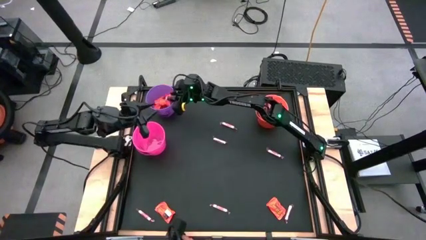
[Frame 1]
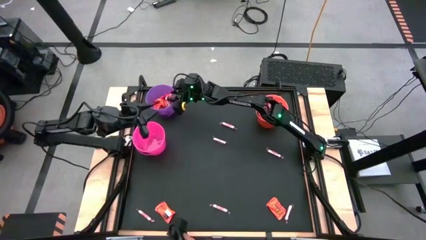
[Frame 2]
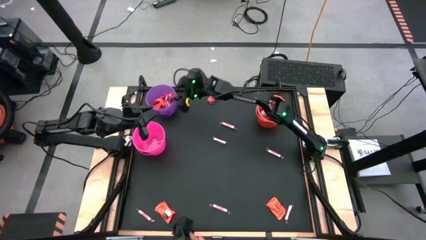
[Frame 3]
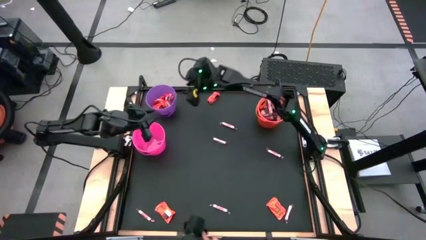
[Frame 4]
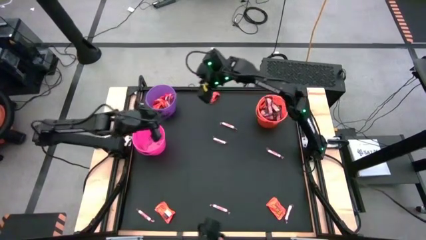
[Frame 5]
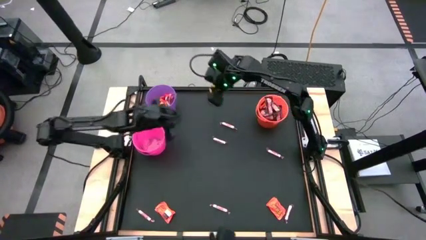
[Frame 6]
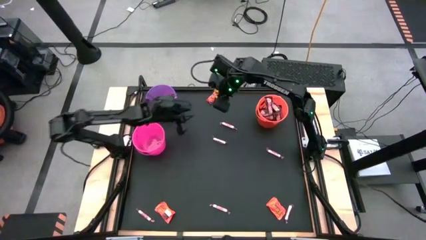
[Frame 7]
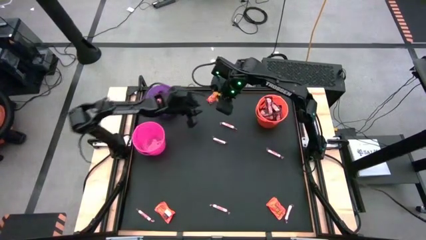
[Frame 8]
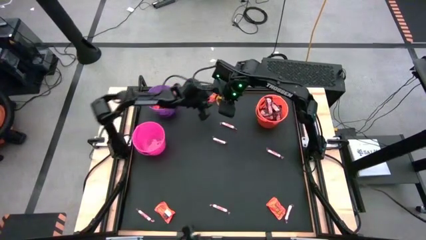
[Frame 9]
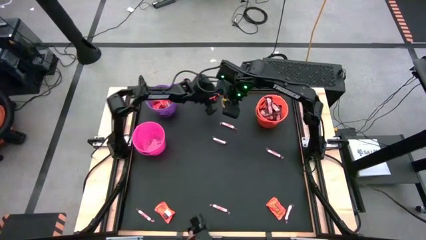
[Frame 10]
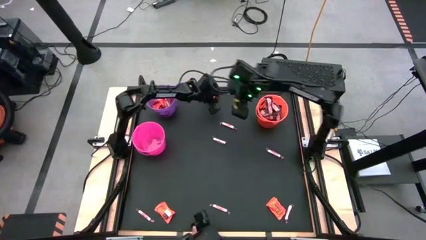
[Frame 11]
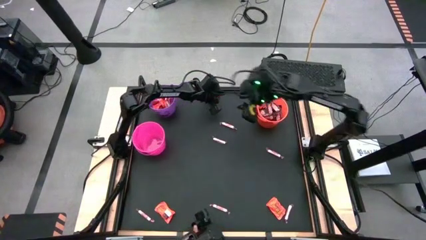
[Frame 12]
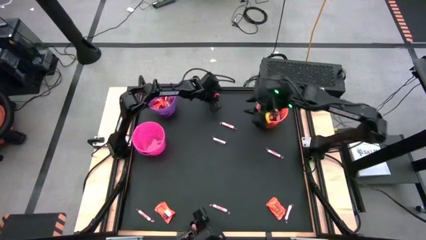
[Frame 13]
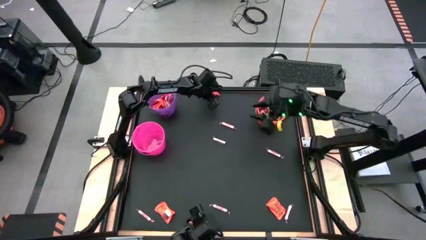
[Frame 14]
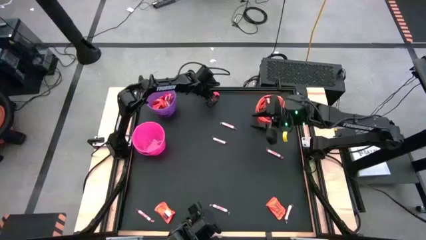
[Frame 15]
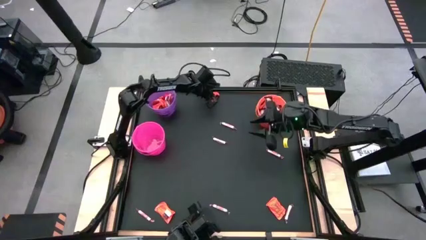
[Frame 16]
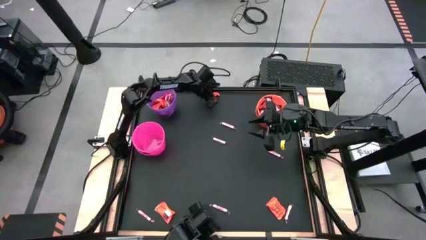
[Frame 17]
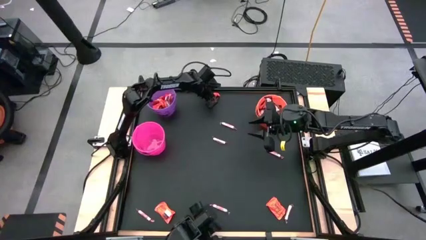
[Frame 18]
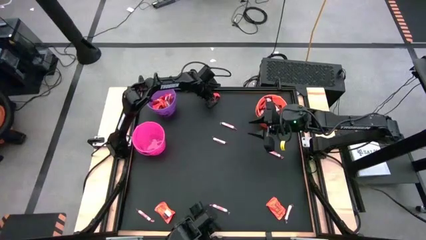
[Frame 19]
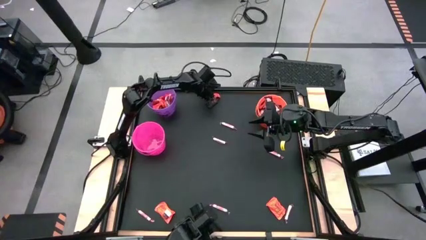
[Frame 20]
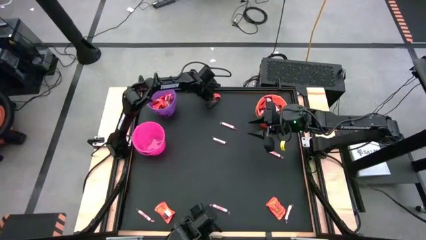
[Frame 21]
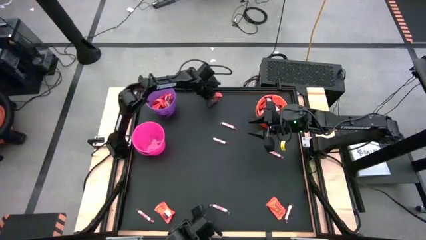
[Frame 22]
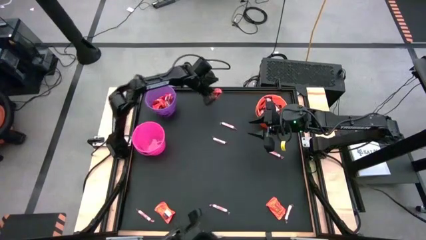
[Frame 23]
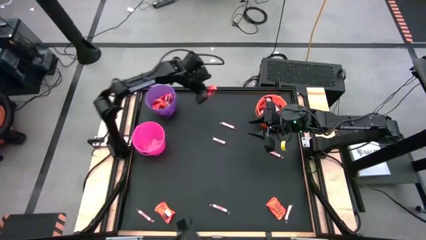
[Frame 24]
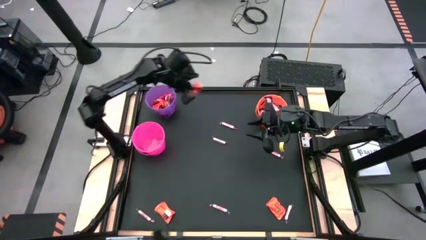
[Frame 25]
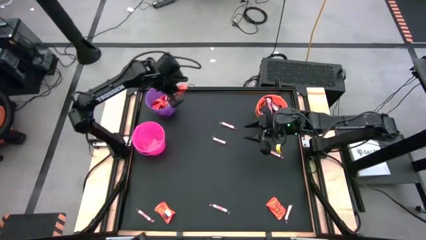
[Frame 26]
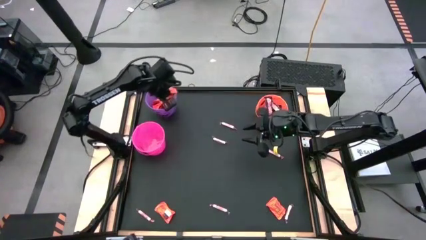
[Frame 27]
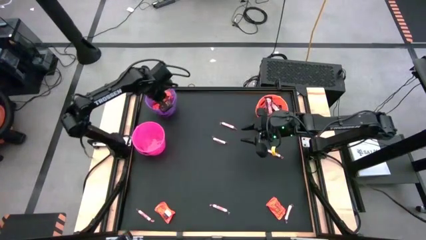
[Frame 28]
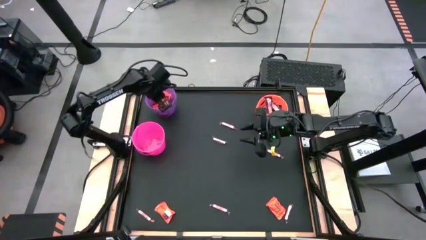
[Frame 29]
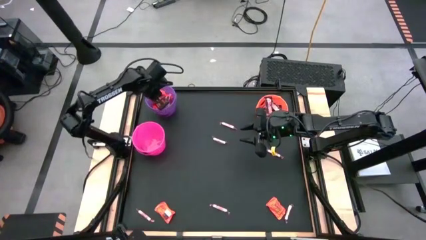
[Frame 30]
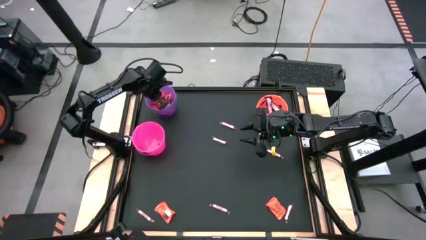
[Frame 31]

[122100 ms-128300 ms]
Task: Sort candy by brand, put in halloween buckets
Put the orange candy into the purple bucket

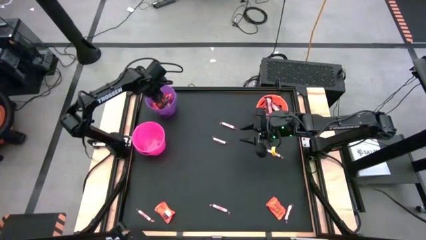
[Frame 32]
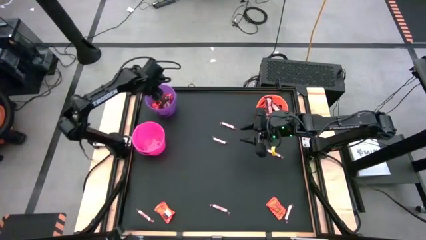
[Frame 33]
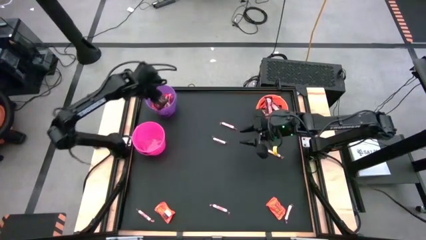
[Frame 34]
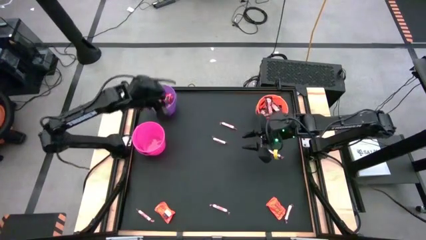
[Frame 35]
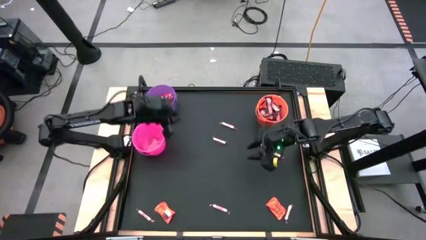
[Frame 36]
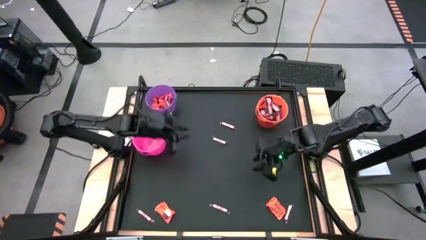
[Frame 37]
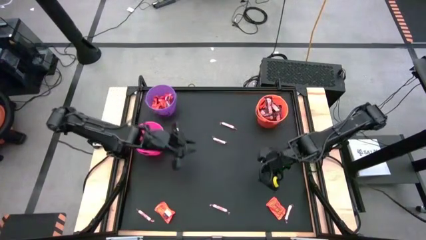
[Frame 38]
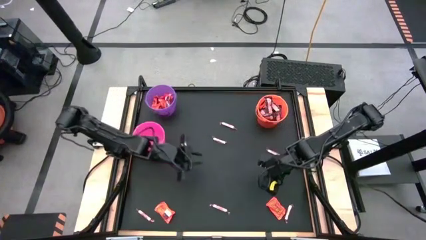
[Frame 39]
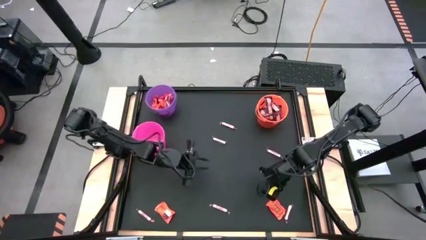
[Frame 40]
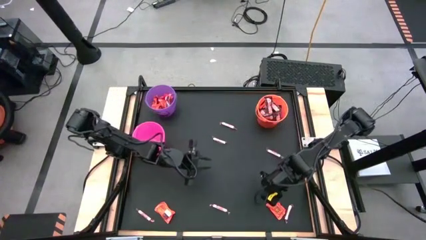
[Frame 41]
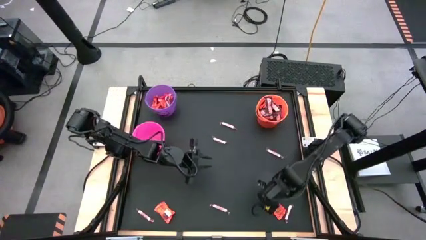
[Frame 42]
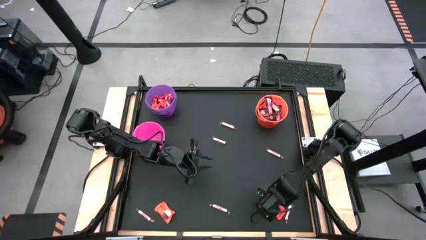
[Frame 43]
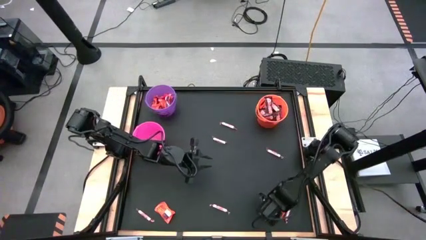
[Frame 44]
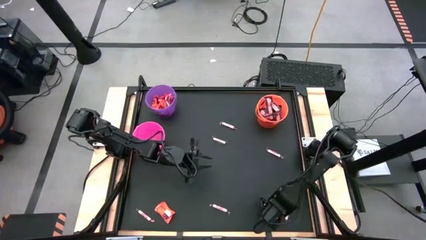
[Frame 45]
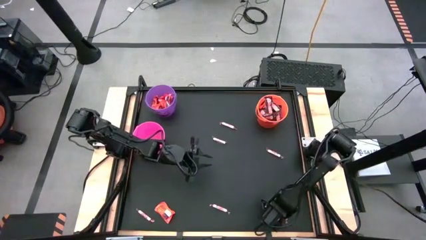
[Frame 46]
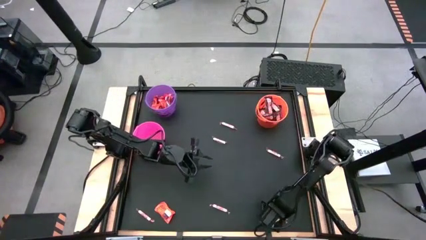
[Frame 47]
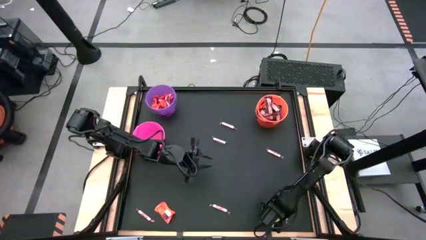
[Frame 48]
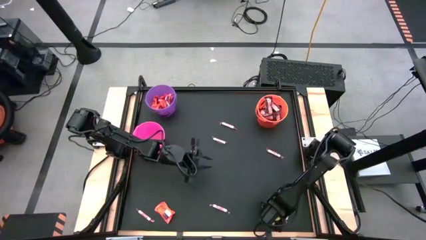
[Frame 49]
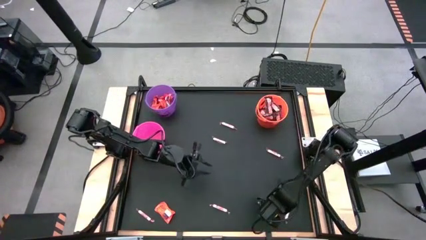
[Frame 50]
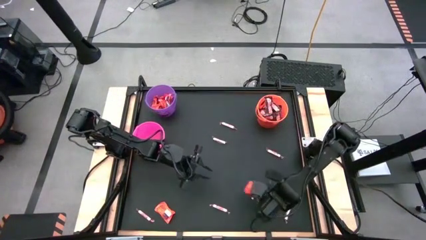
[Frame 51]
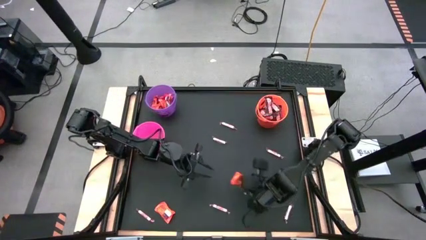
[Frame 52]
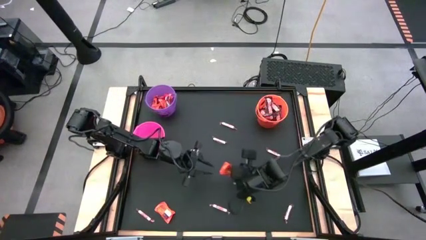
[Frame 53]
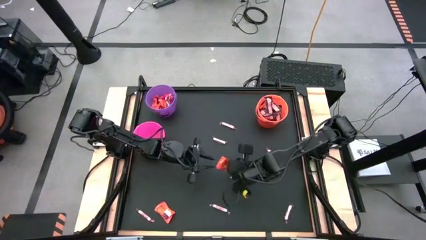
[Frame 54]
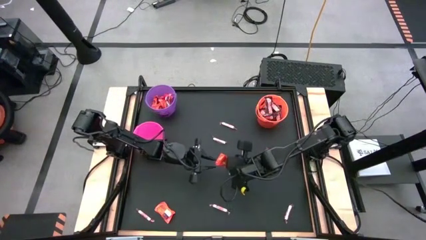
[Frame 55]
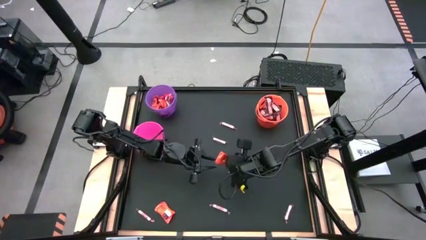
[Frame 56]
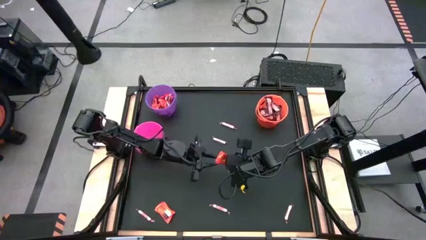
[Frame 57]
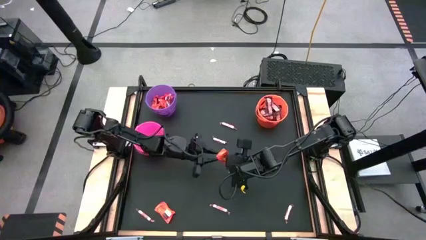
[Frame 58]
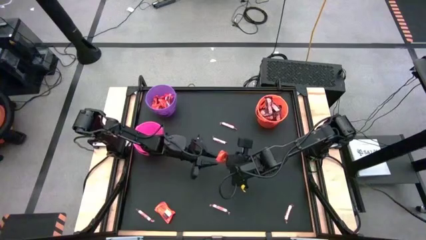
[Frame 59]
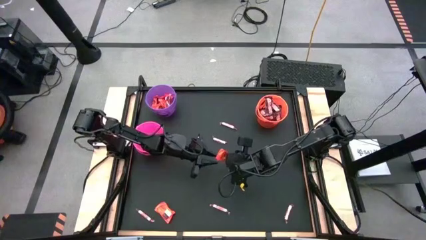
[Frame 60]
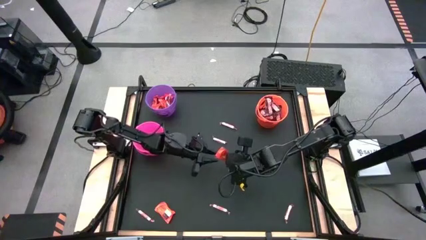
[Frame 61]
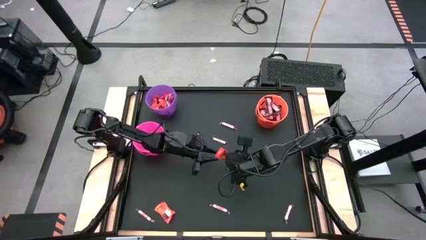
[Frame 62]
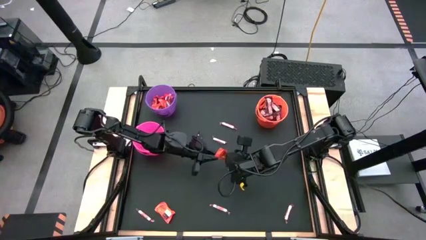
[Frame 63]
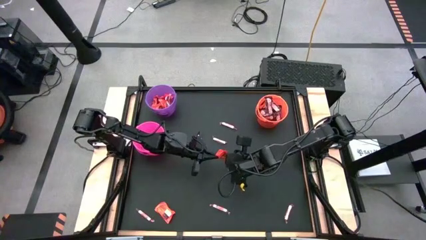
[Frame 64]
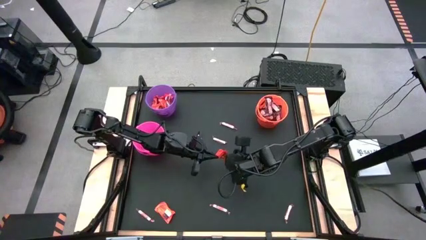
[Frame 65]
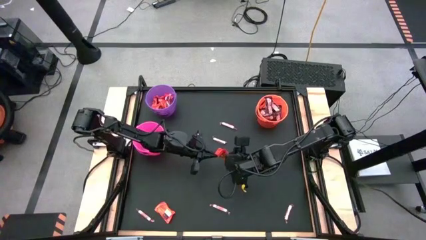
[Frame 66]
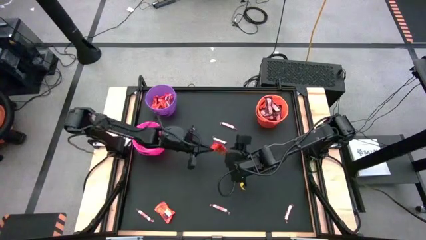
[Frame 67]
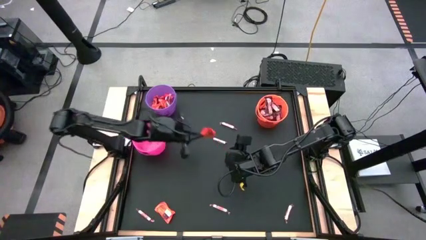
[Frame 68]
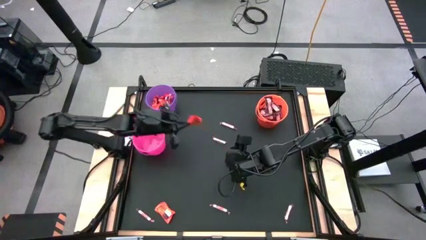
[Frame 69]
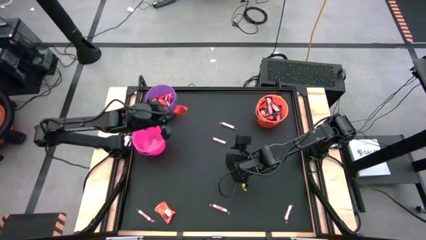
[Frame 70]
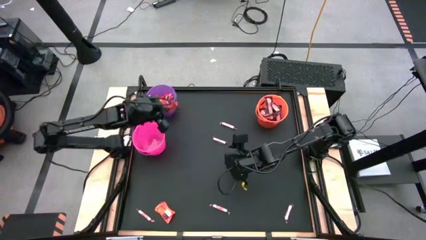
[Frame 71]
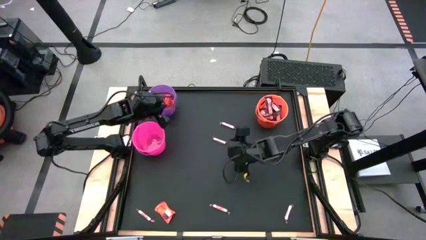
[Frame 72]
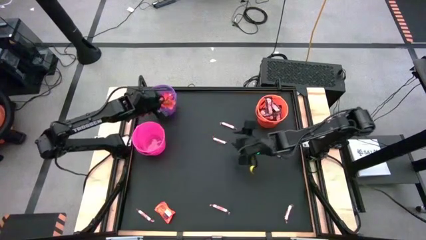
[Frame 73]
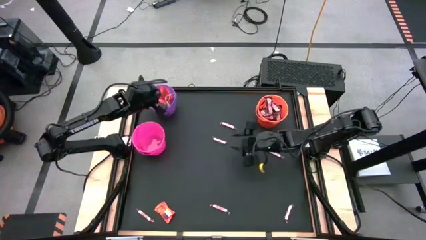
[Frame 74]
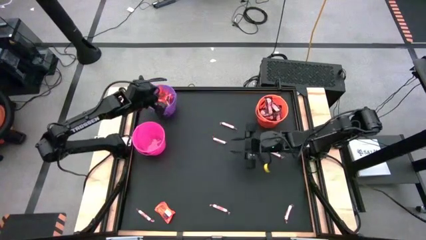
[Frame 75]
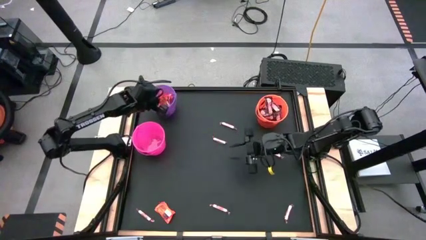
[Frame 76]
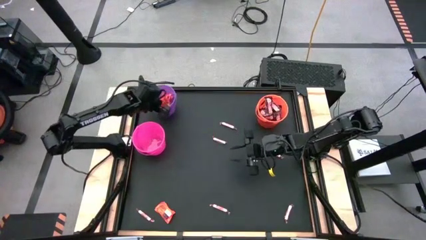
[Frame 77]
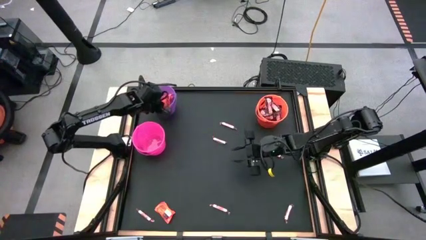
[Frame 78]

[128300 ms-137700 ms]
Put the orange candy into the purple bucket

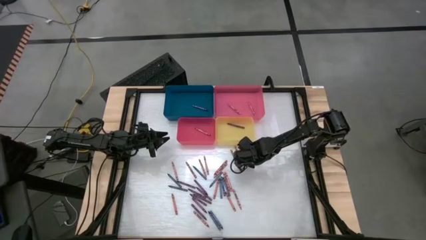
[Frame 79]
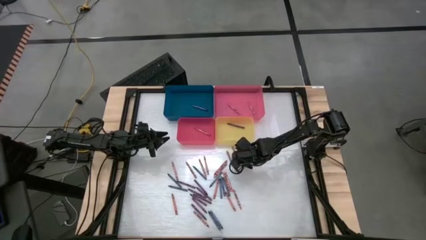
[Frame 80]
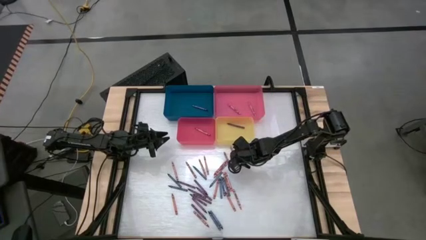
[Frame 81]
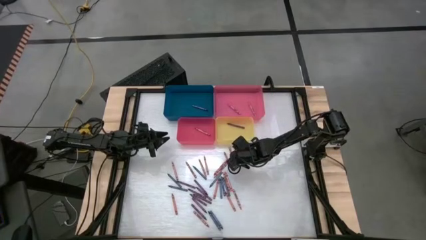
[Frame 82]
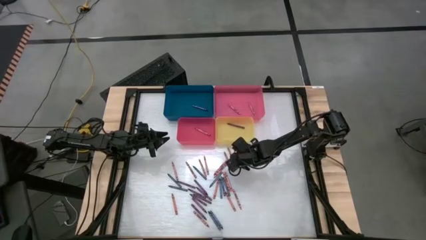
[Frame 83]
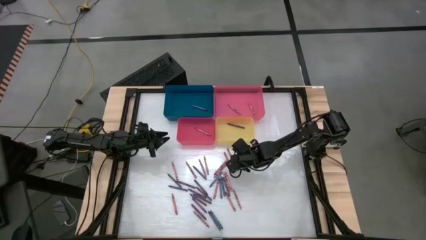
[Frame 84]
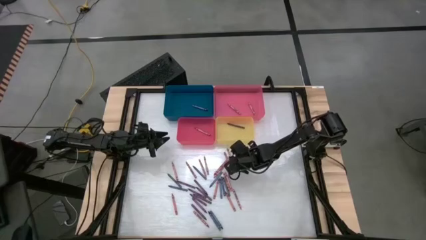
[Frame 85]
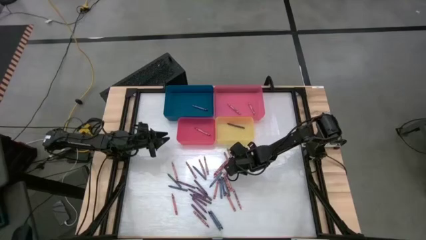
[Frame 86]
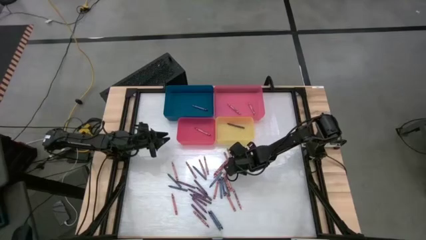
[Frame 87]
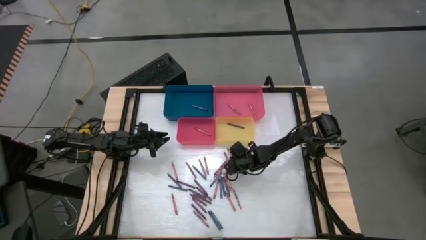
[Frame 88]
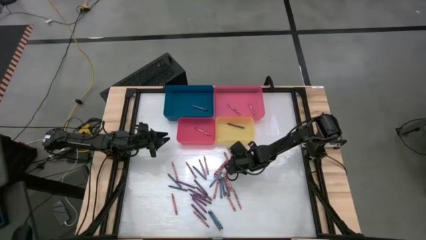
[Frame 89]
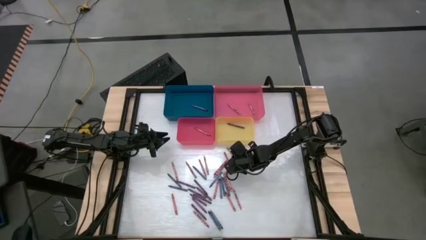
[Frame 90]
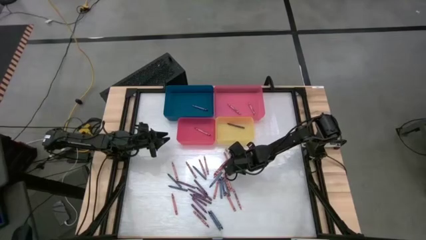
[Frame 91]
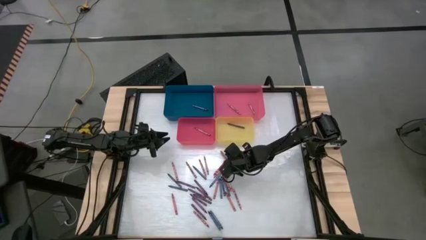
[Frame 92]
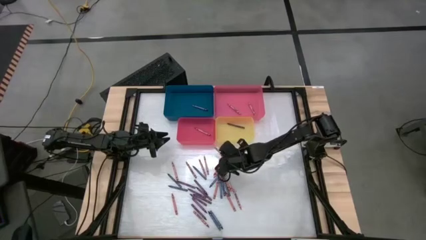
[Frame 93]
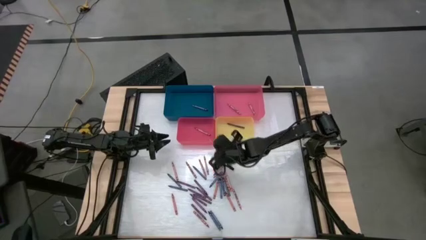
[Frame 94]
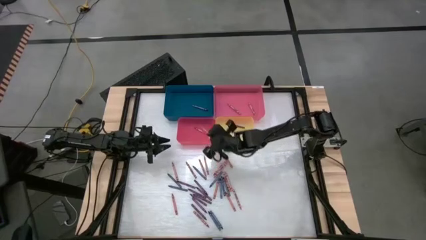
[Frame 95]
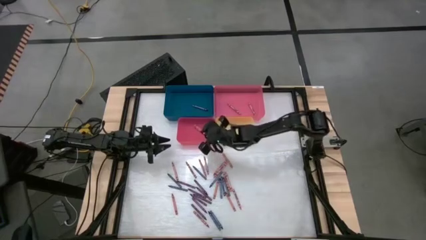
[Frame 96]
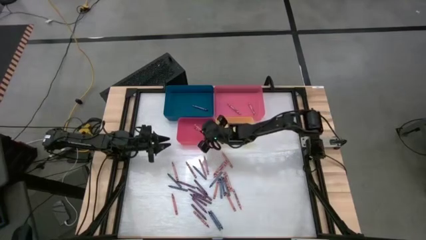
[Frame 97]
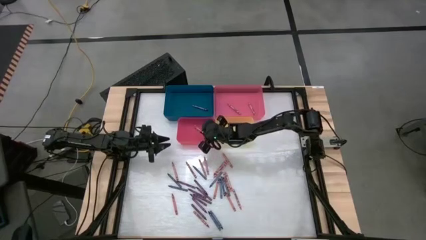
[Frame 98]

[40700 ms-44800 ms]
Task: Sort crayons
Put the red crayon into the red bin
